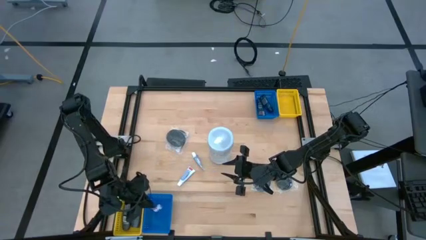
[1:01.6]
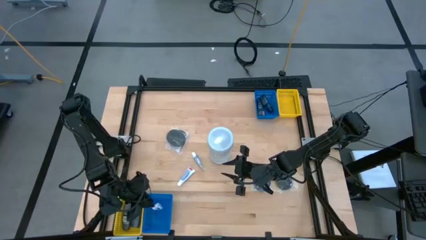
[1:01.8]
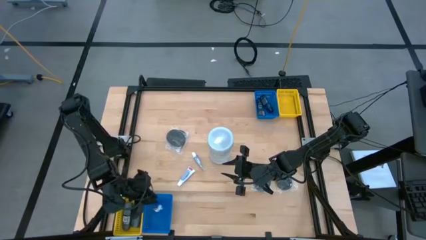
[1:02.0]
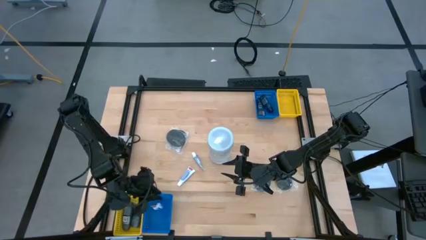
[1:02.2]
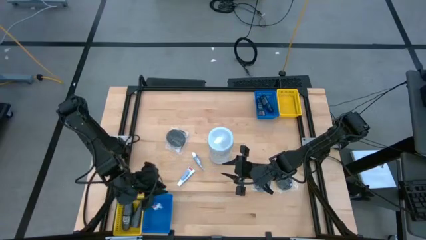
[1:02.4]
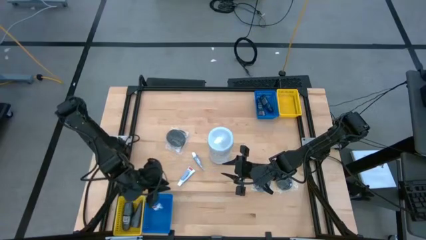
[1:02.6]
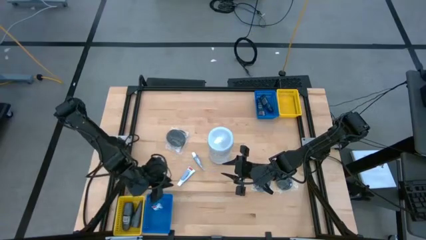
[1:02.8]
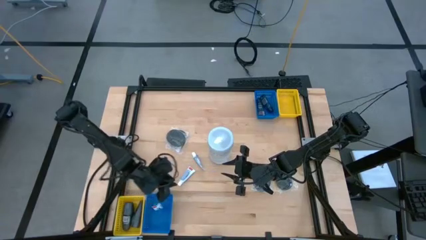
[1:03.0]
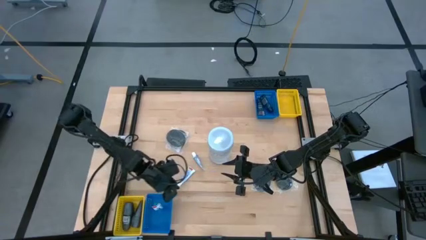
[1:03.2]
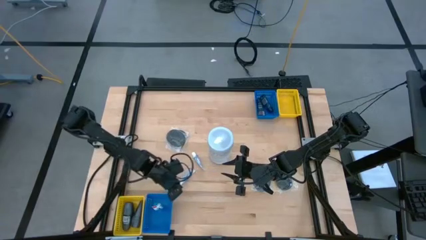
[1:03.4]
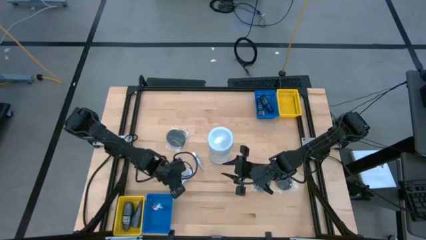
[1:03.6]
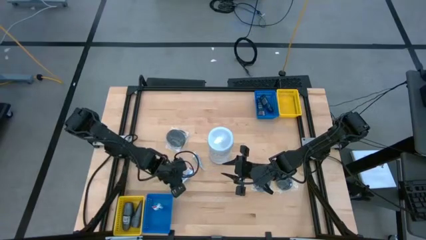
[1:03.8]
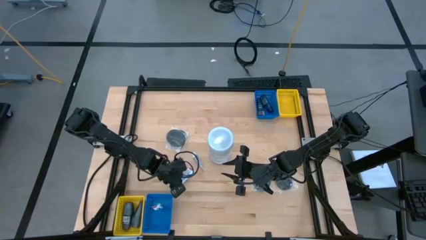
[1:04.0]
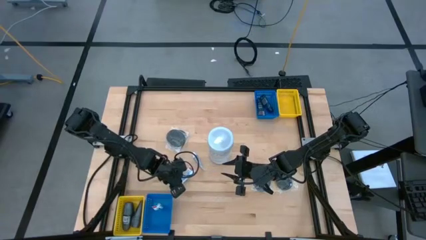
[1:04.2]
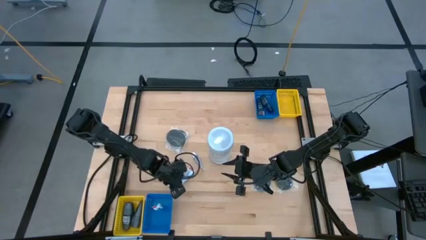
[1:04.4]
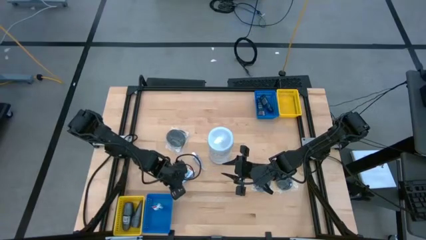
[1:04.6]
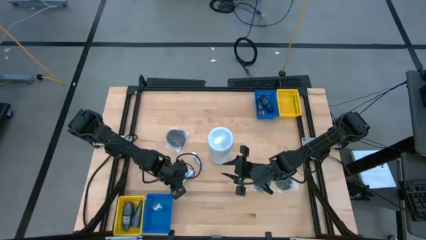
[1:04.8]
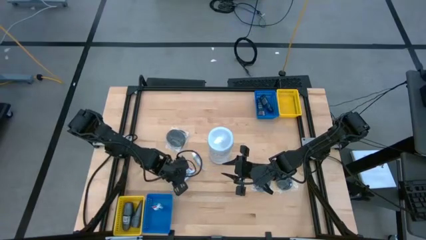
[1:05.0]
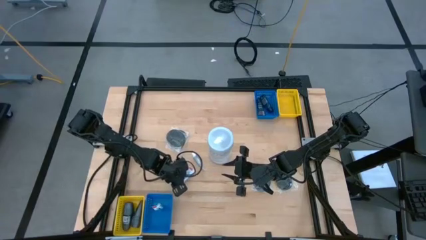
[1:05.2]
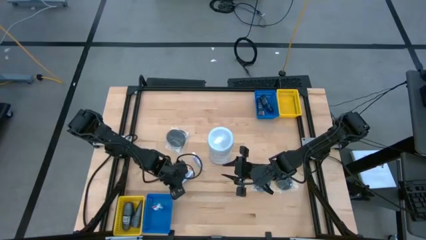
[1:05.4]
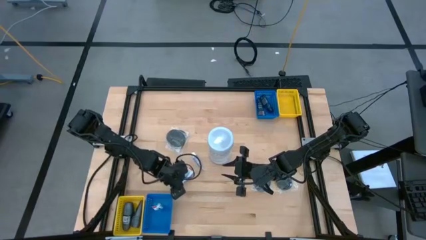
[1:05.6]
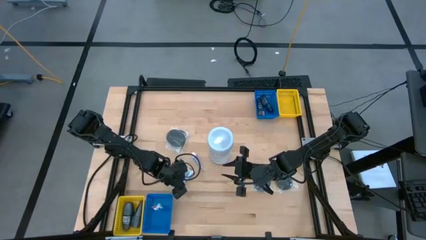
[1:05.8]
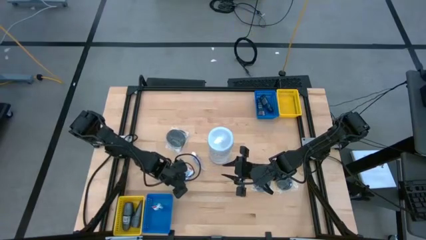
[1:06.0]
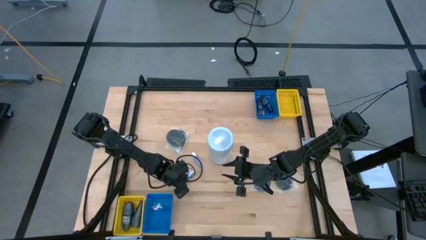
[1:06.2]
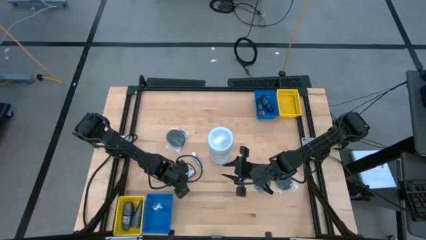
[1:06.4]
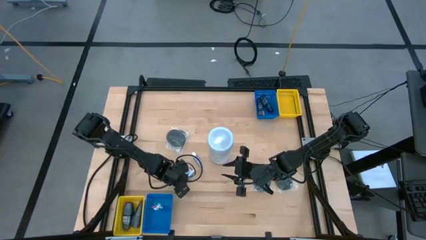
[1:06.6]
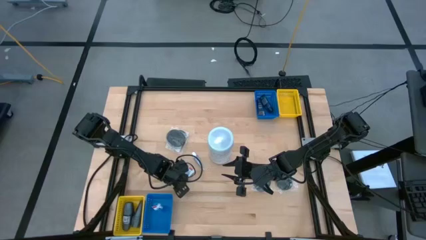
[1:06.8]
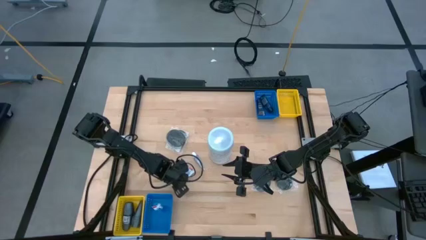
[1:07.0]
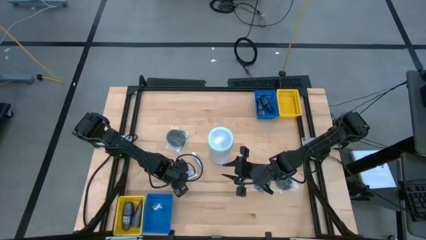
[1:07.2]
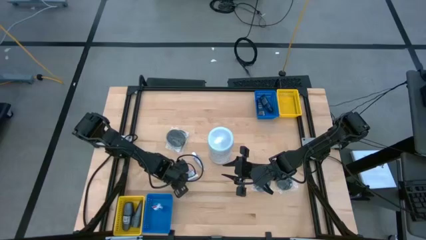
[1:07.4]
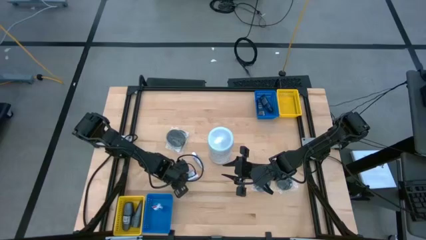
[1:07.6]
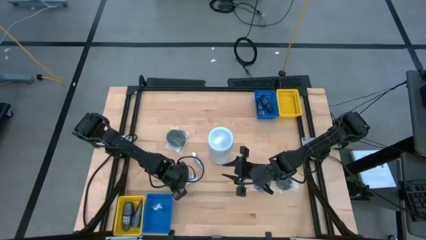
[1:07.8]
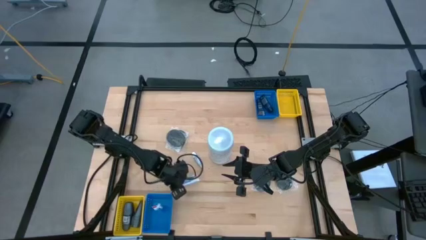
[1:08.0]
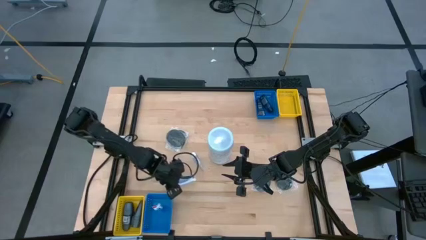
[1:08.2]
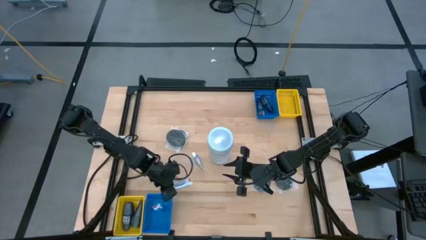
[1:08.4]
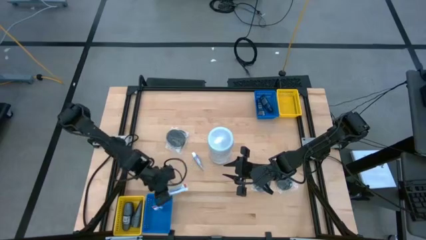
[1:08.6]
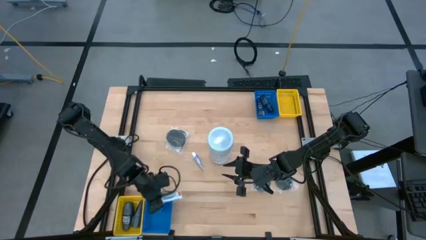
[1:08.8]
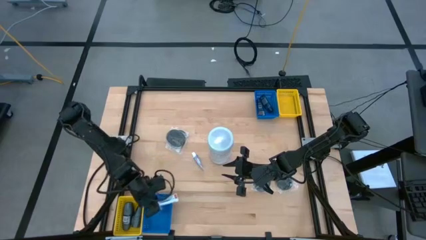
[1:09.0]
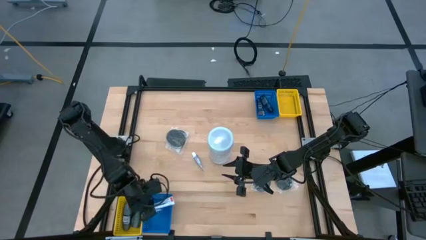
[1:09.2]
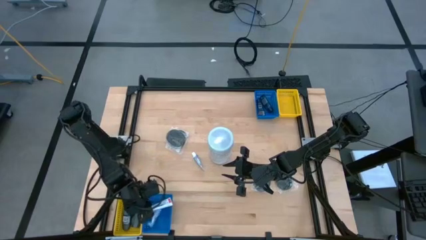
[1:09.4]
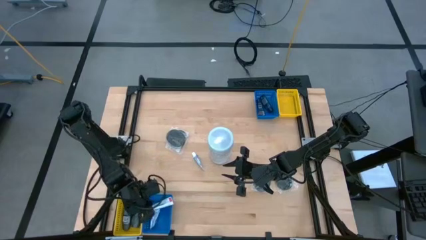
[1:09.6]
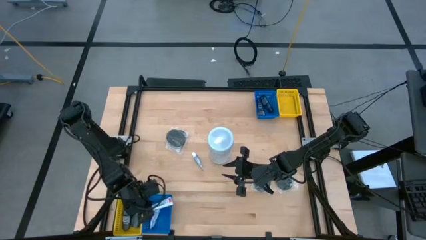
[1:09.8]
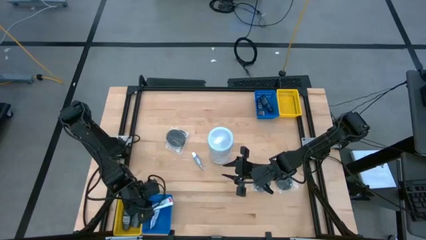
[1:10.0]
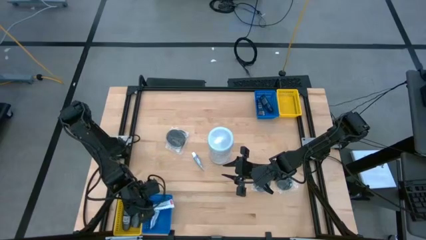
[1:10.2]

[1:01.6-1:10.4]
Task: Pick & Place Travel size toiletries
Put the left white toothpaste into the bottom blue bin

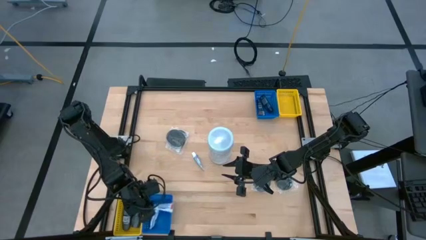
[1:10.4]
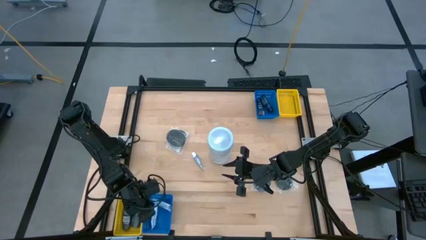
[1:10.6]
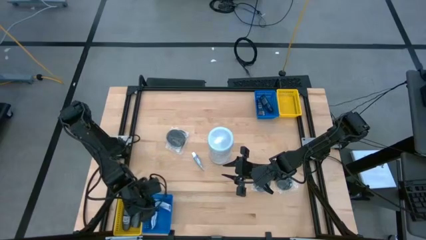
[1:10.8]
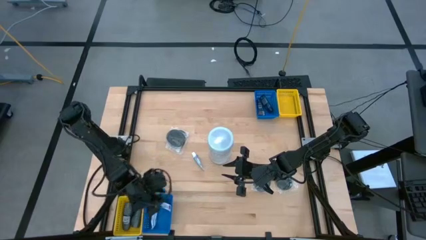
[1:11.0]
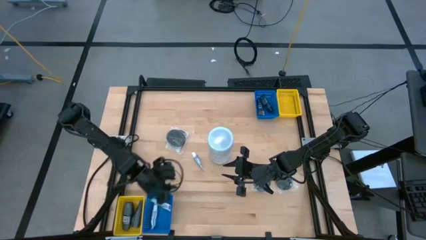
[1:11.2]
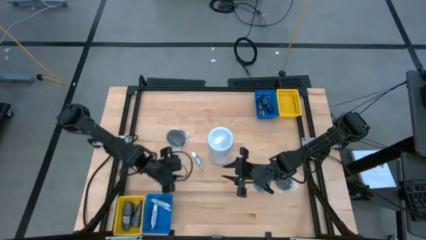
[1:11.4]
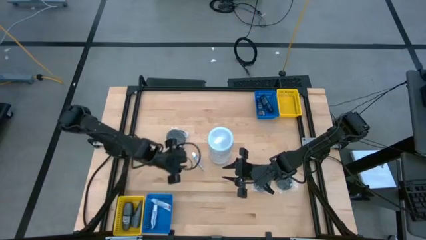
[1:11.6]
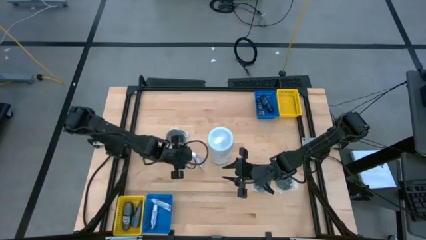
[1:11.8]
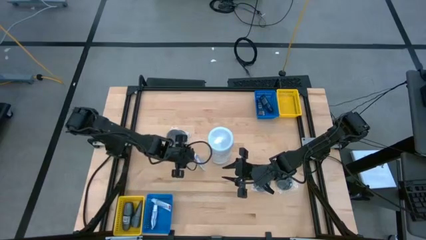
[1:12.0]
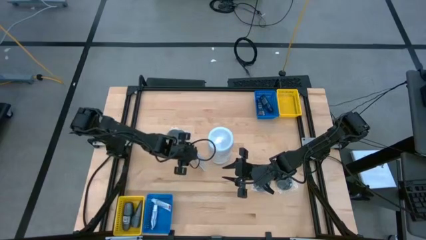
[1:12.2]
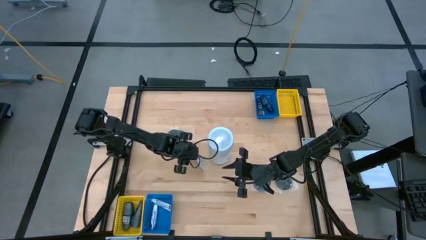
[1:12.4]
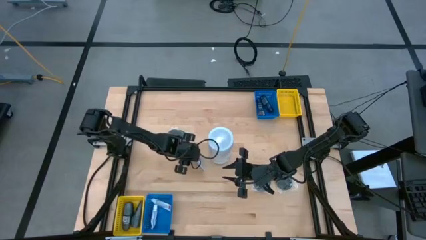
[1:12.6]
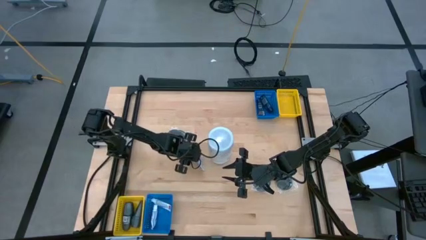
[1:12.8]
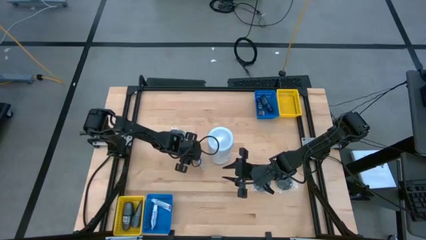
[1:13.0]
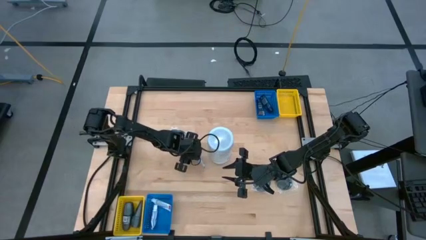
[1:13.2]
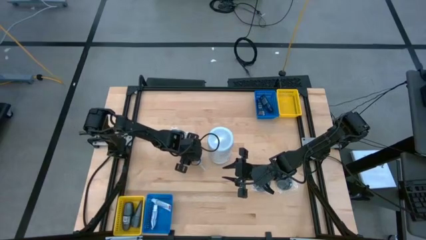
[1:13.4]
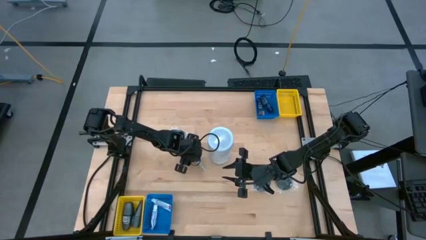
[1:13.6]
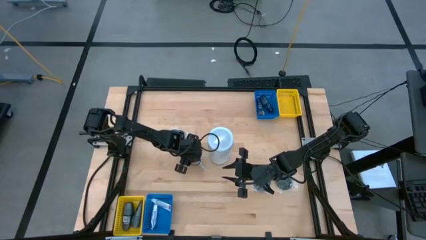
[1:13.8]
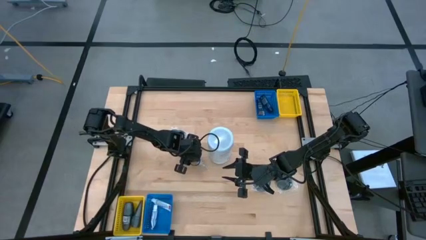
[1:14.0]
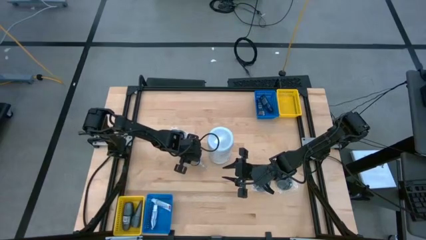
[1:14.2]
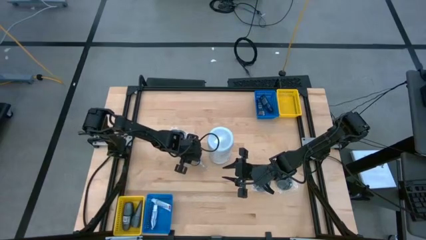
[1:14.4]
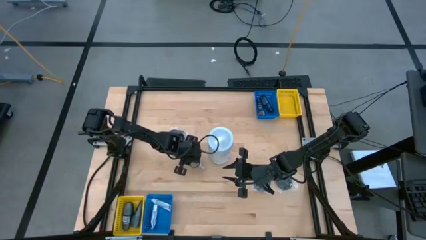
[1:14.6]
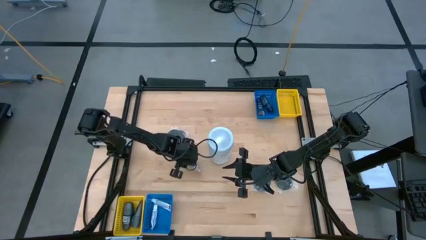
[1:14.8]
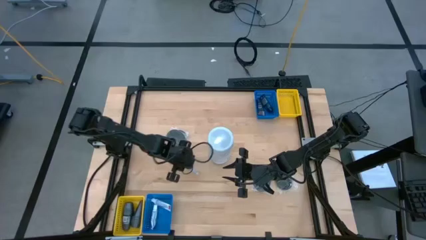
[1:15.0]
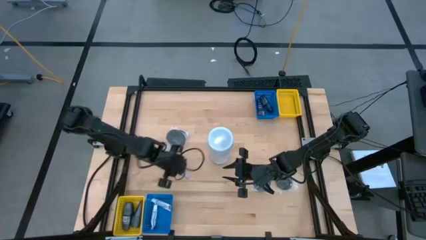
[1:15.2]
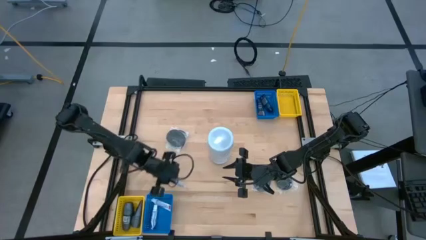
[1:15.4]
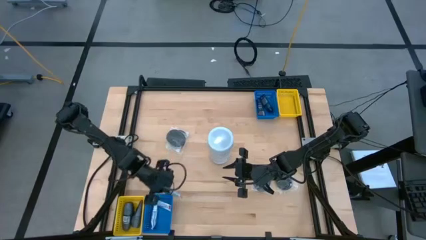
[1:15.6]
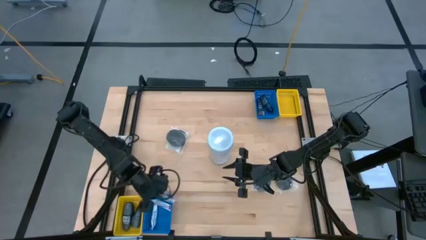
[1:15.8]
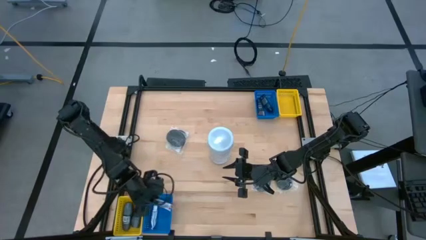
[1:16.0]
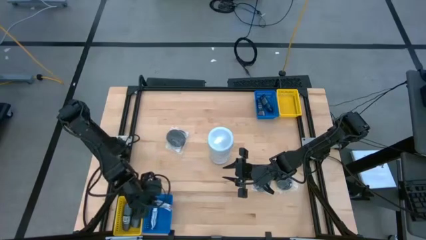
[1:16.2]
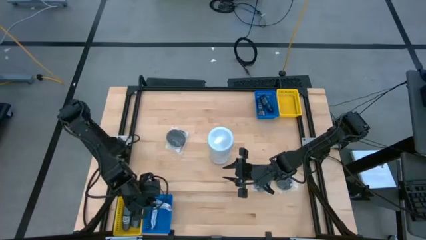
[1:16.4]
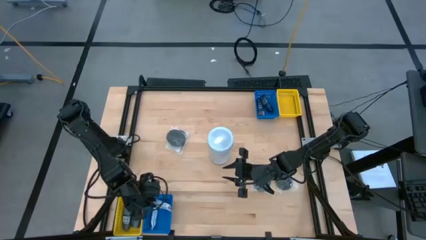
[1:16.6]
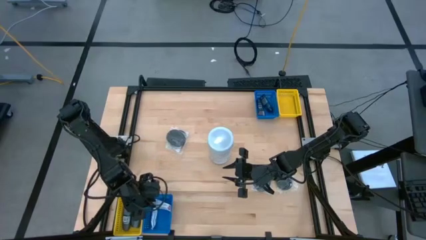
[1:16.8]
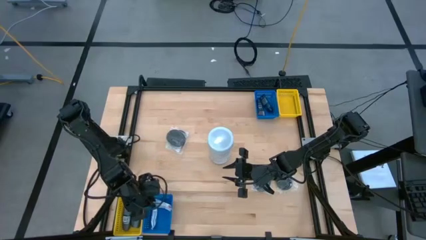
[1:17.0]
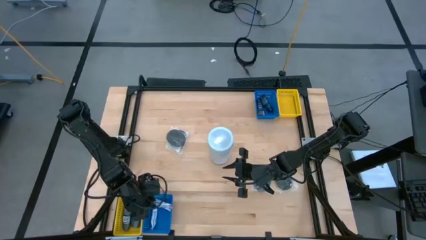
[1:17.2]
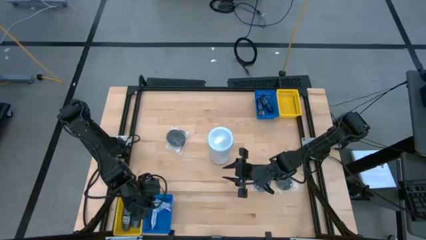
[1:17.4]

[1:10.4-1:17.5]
Put the white toothpaste into the bottom blue bin

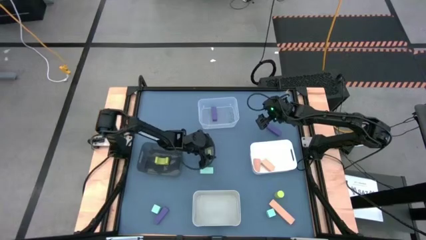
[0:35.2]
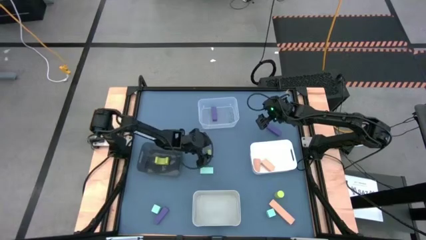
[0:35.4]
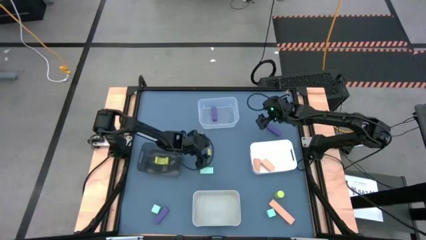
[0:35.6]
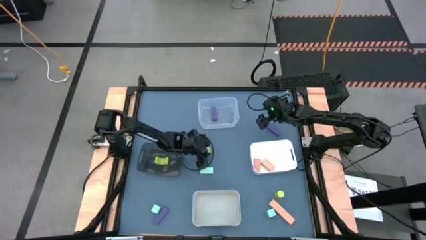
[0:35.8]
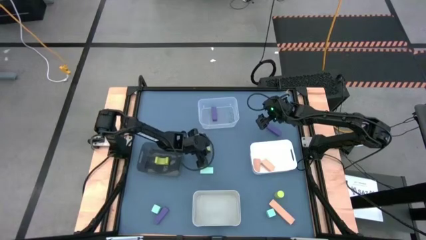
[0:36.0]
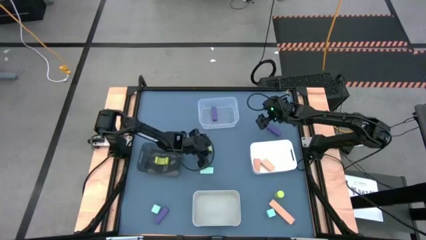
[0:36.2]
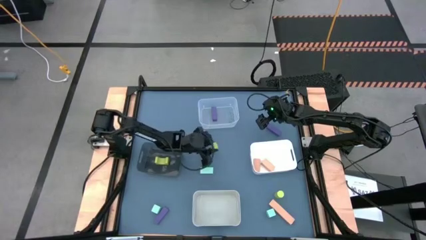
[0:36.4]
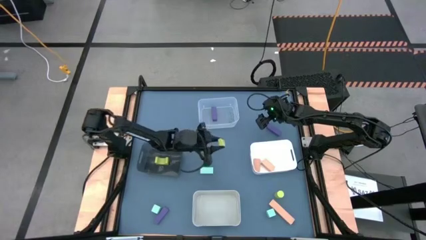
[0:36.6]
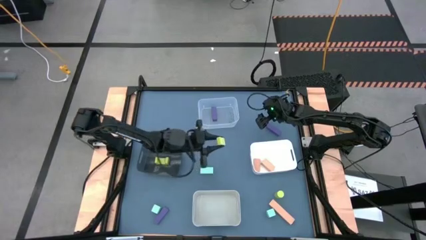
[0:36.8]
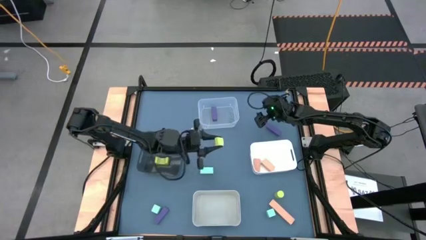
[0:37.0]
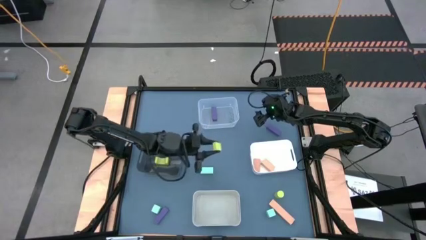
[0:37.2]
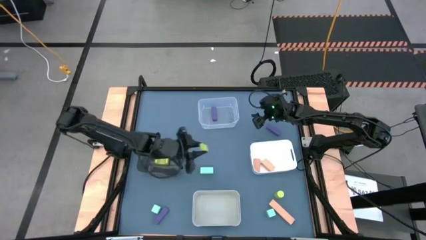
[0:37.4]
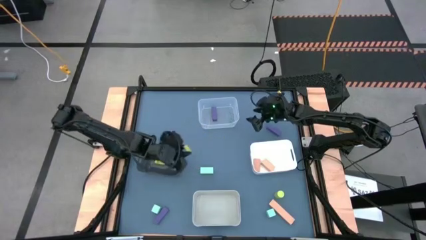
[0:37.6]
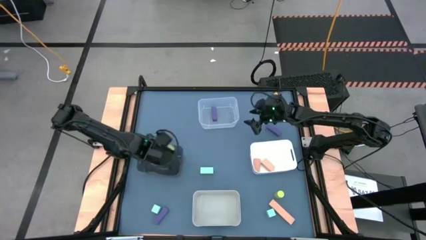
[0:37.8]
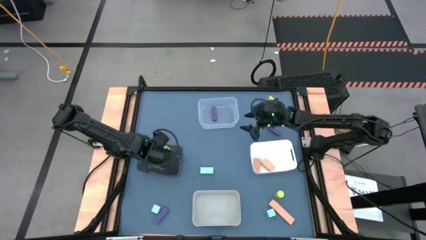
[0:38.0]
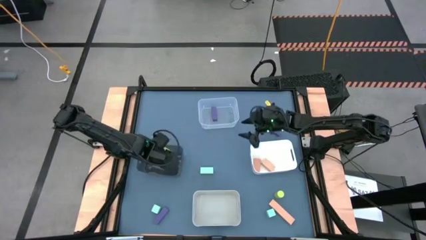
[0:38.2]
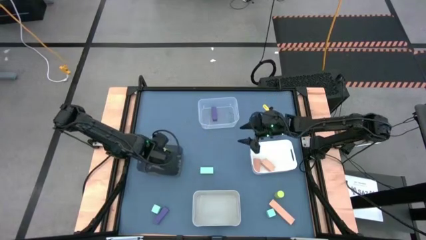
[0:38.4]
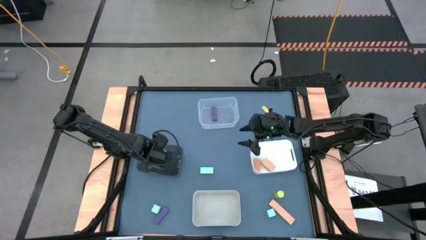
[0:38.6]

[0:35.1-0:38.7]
Task: Sort & place blocks by color
Put the top green block into the black bin
